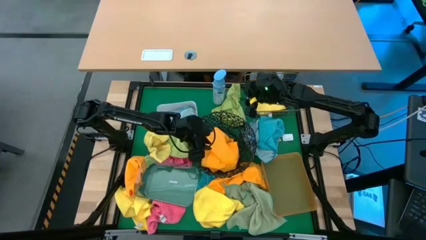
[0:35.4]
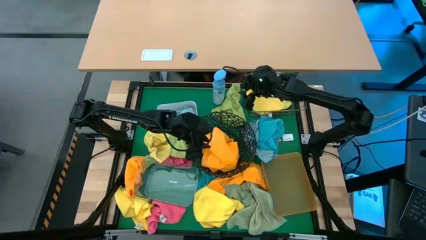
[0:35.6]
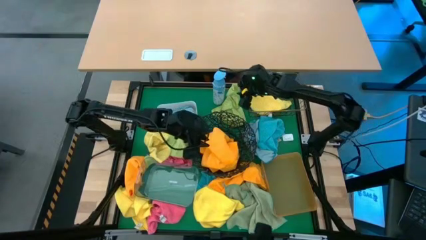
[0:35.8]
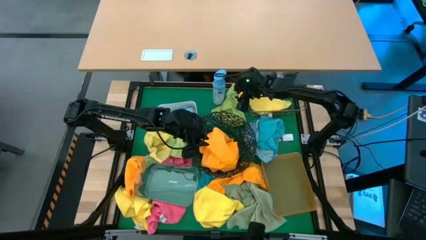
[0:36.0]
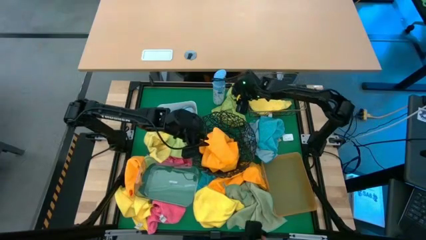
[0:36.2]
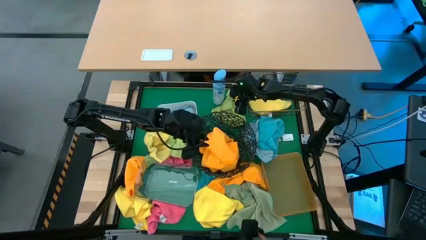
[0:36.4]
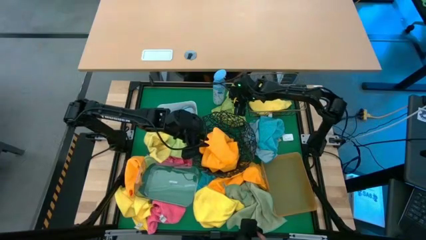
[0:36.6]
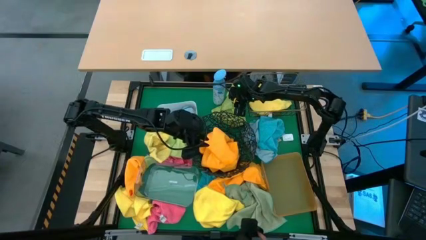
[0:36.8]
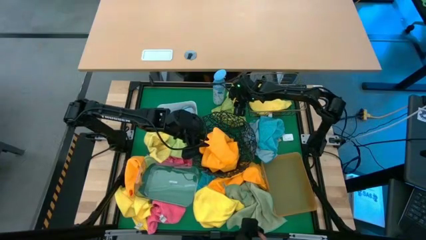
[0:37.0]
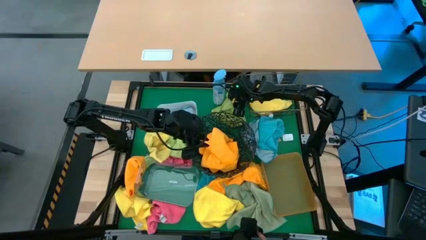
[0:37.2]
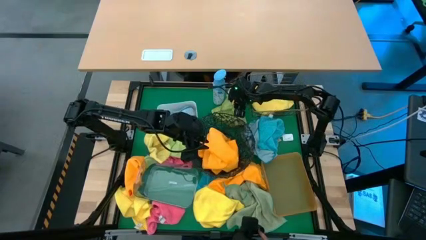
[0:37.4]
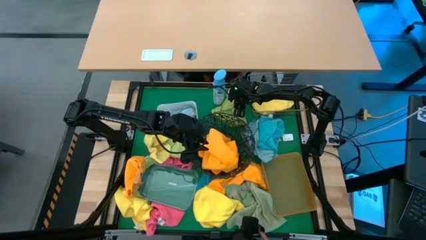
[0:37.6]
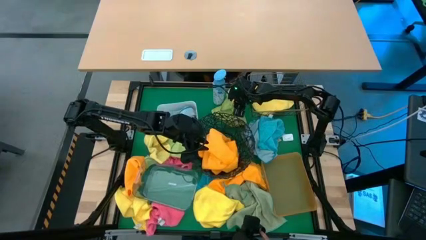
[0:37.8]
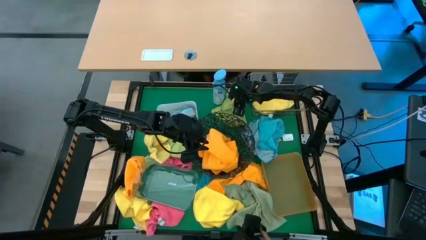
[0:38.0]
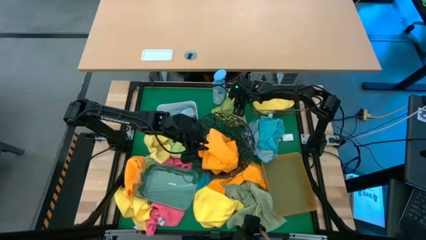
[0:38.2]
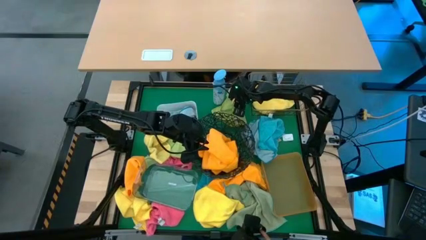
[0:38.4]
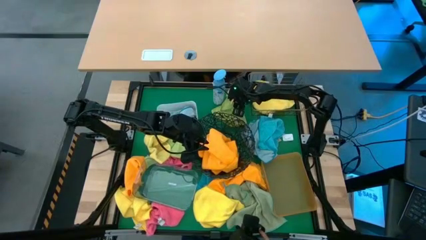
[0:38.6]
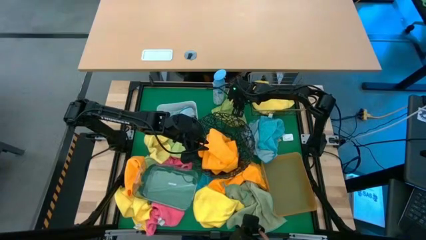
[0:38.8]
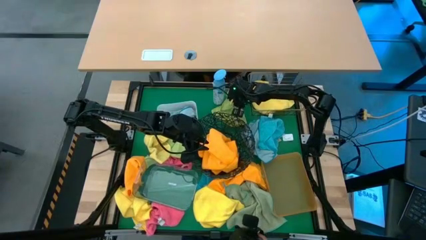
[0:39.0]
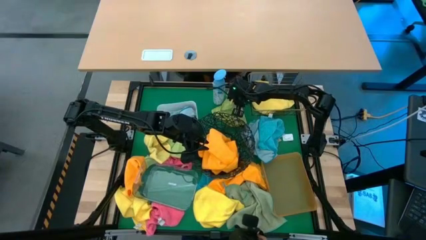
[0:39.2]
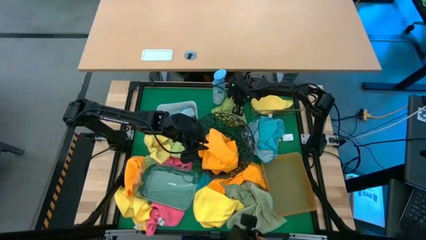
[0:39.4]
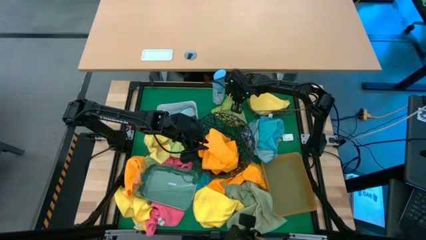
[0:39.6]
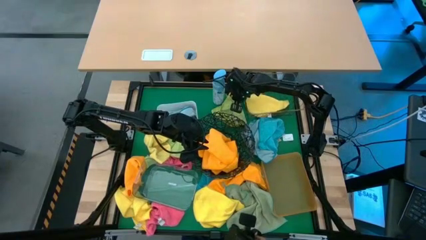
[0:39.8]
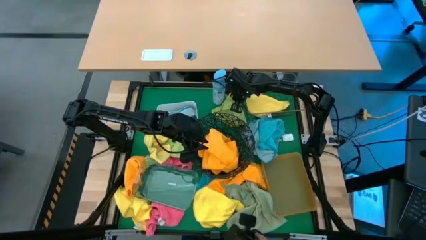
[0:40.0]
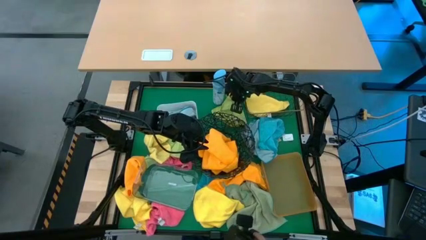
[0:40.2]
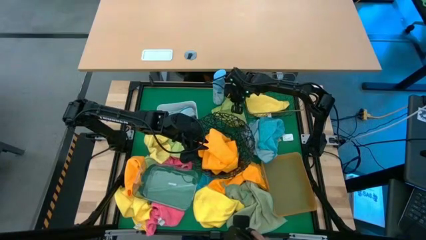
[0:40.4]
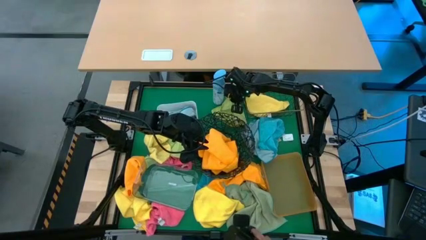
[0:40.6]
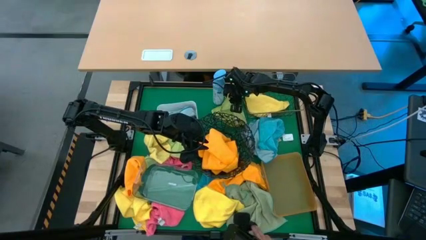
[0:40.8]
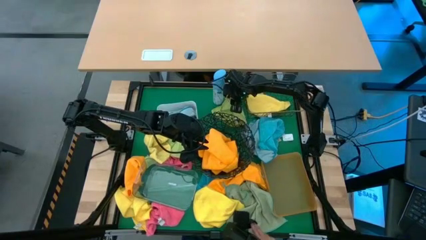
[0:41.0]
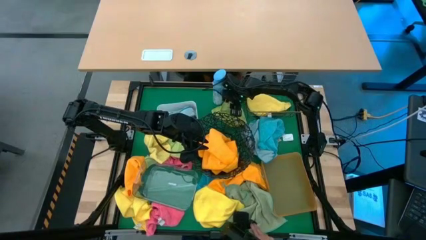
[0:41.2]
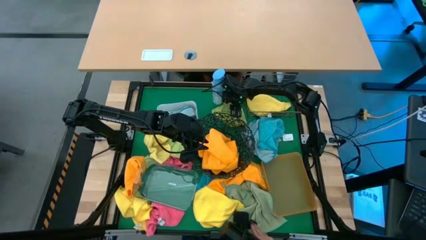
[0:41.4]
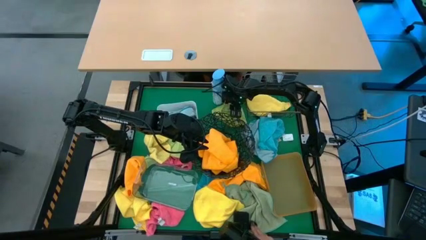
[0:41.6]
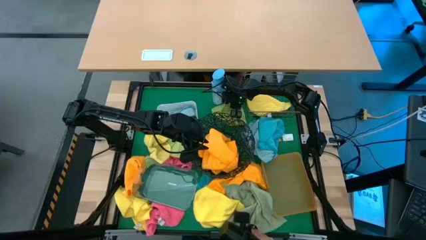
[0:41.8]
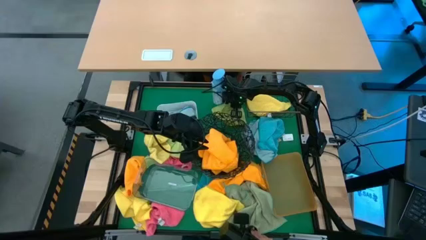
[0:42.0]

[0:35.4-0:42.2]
Task: Sort microfiber towel by color & place in baskets
Put the green microfiber towel into the yellow bin

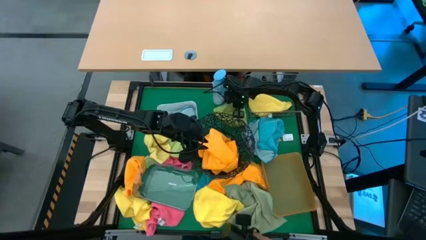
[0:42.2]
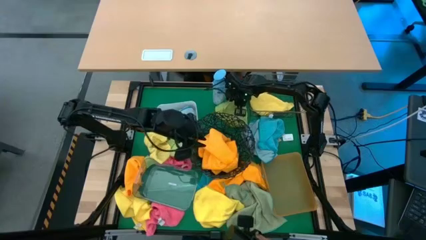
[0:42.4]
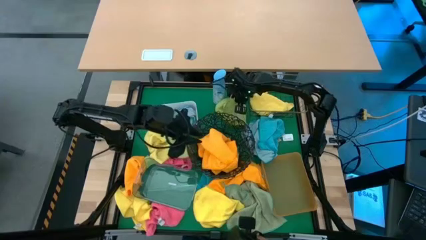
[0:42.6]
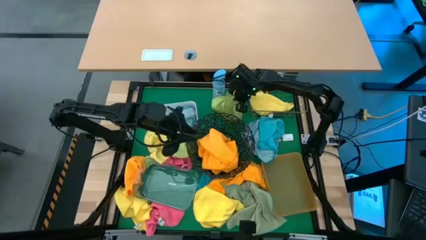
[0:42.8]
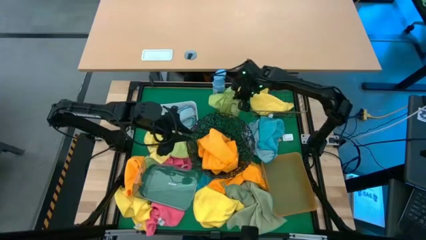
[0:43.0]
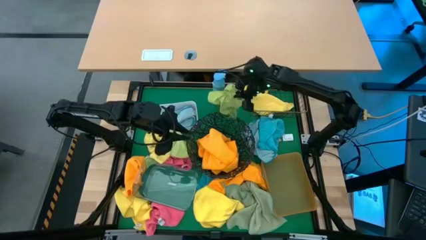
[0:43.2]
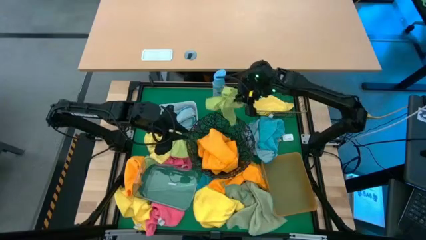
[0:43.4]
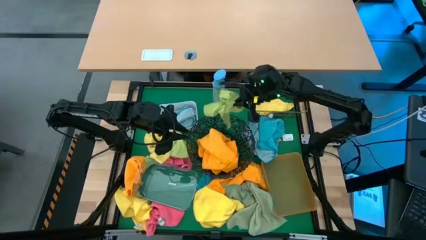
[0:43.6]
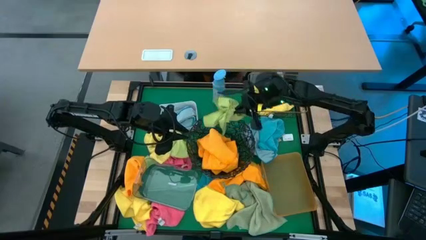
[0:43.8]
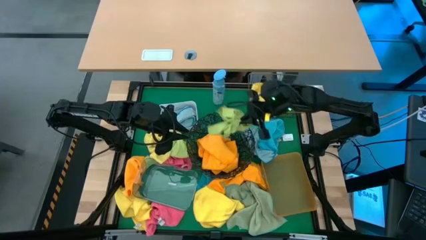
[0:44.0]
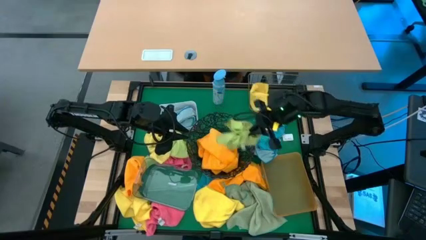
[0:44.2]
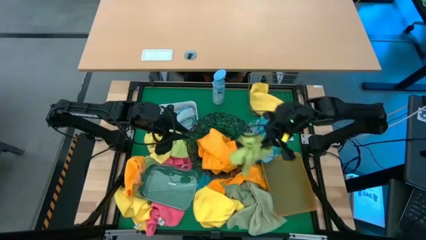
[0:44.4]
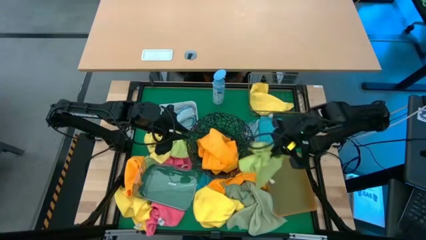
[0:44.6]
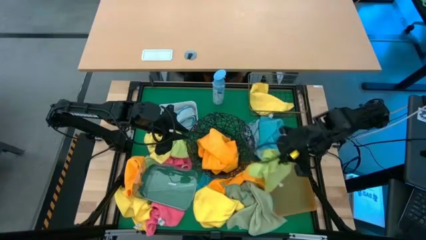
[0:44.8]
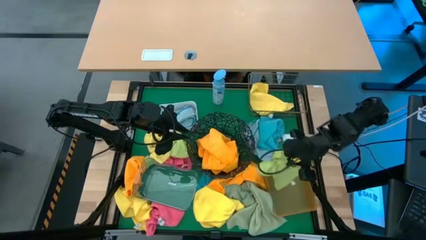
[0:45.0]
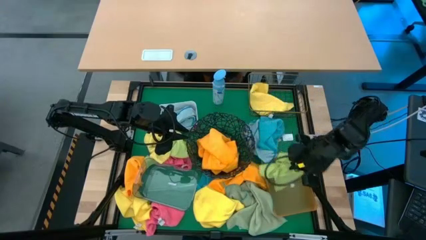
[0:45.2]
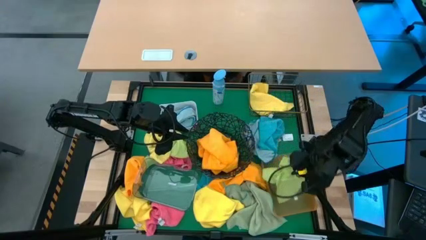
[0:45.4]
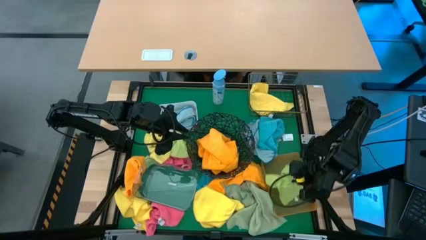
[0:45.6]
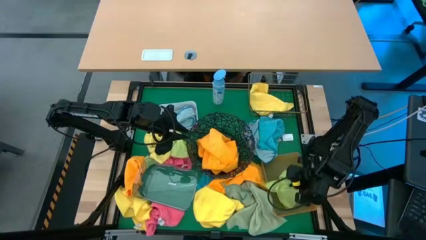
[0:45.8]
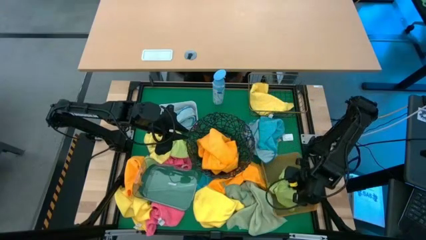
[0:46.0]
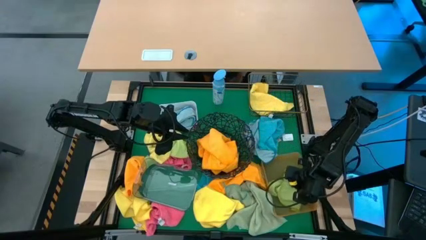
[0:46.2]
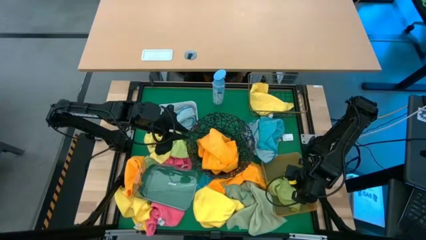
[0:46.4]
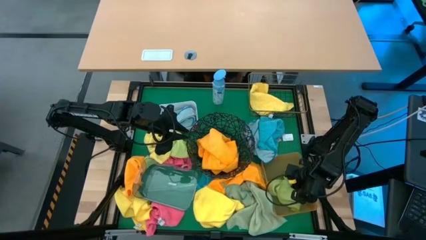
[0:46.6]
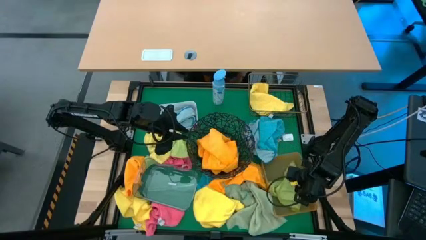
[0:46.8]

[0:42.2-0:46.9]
Put the green microfiber towel into the yellow bin

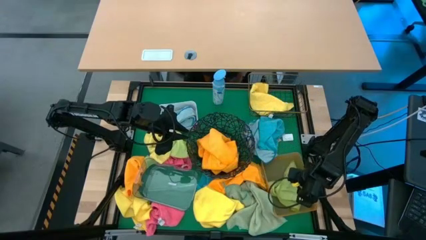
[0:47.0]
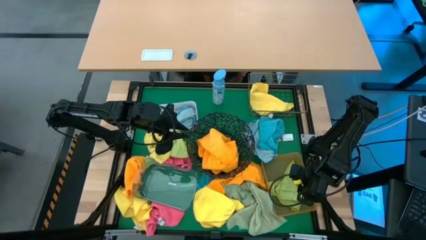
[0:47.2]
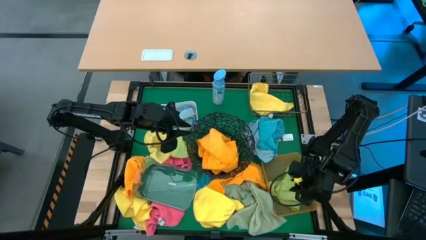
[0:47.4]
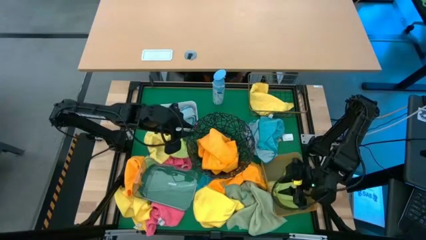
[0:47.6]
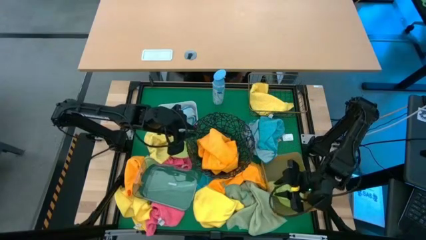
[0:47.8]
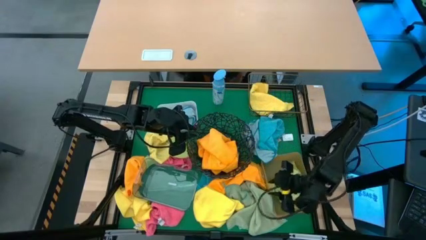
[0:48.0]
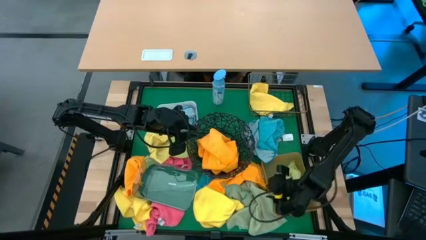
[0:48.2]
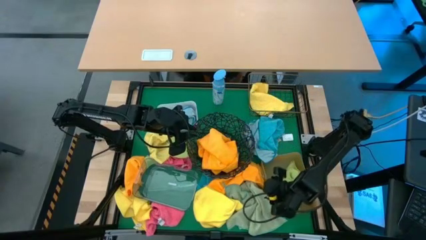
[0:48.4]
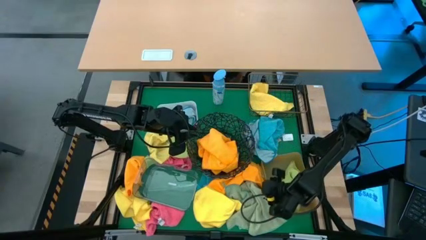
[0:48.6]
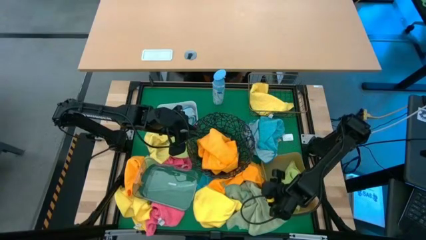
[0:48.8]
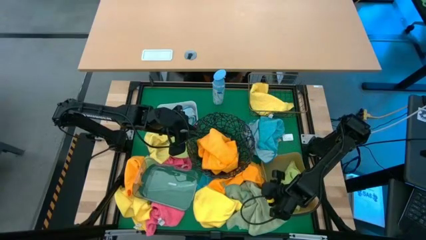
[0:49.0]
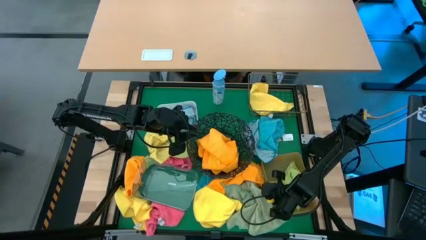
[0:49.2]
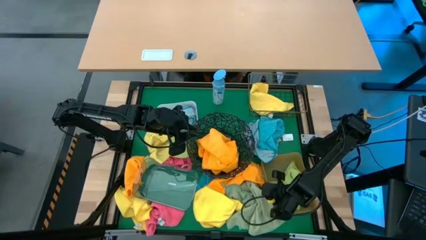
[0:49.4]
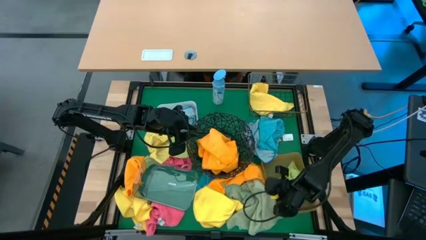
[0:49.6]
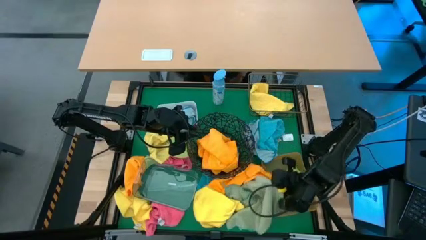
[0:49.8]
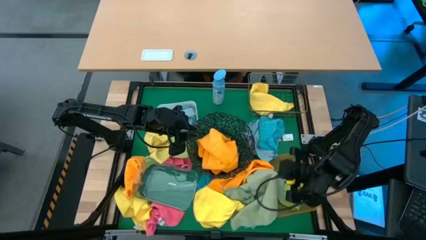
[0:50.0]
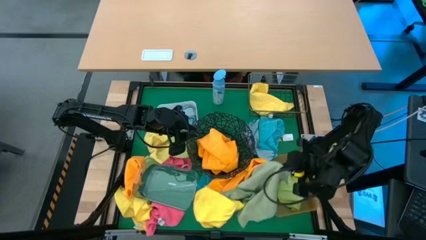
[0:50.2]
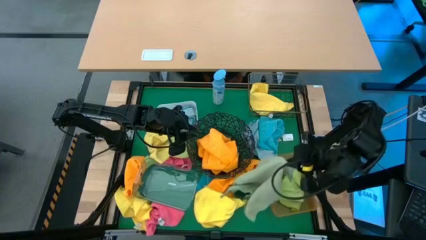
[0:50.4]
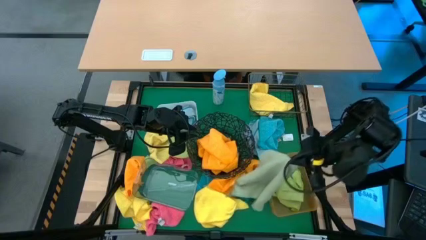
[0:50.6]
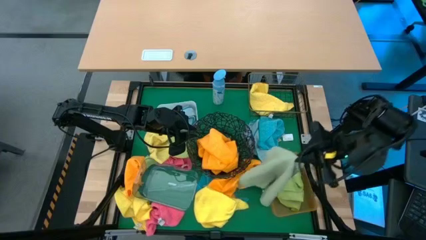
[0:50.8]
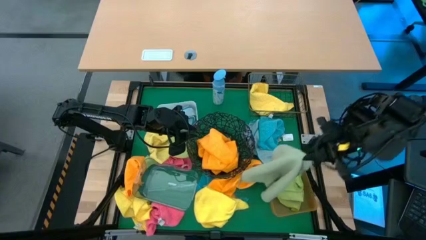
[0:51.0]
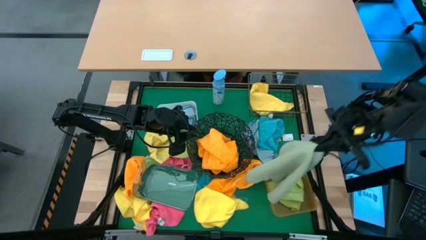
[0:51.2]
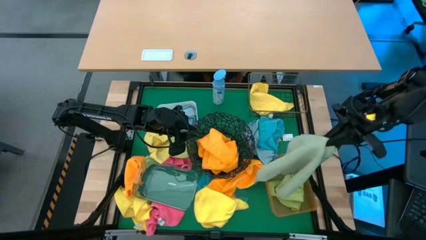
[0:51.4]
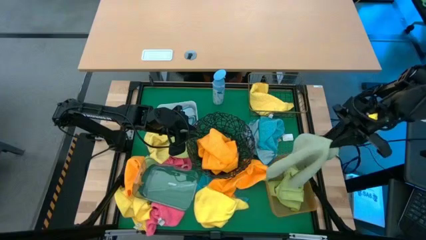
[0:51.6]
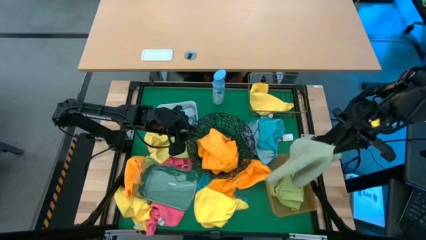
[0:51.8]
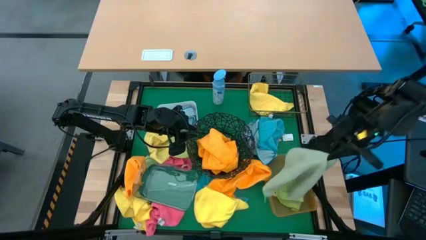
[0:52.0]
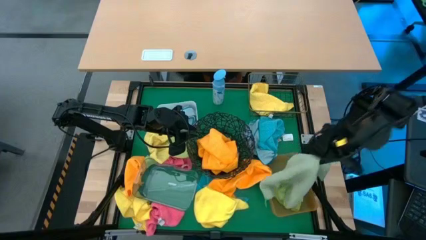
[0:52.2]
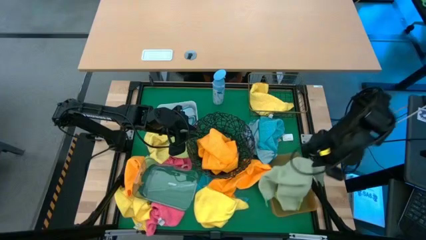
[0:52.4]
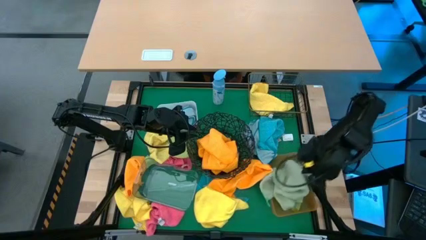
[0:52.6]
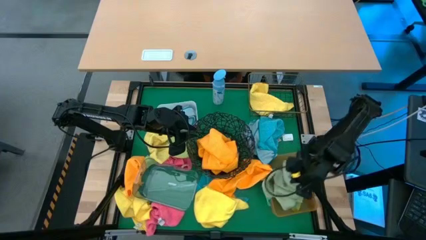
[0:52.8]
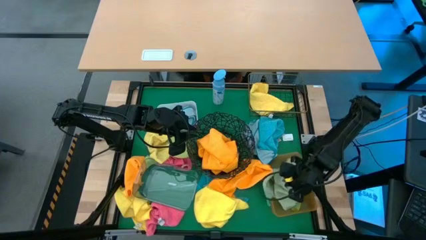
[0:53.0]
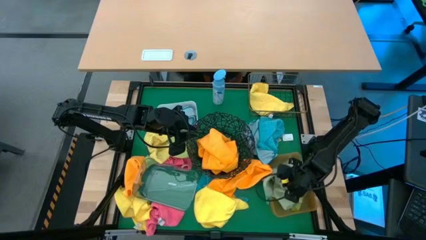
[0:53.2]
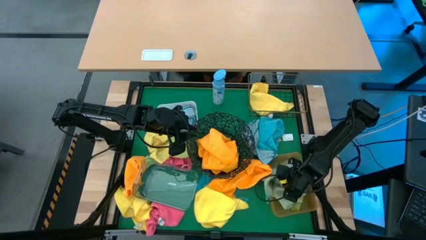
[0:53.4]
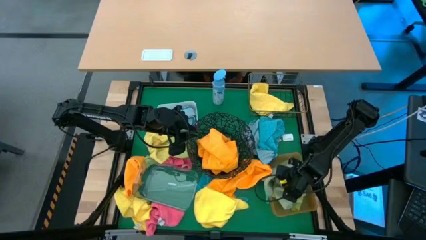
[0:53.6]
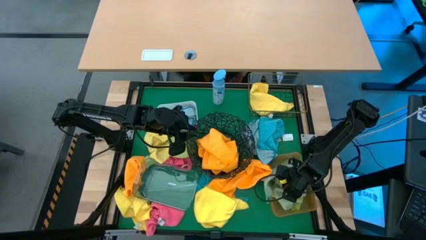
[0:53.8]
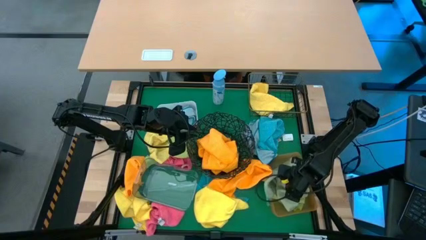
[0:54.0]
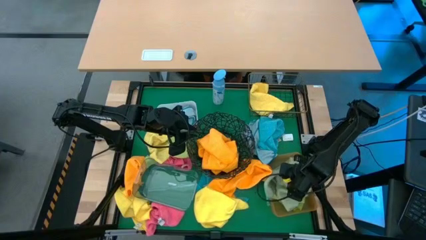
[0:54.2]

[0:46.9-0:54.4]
Put the light green microfiber towel into the yellow bin
